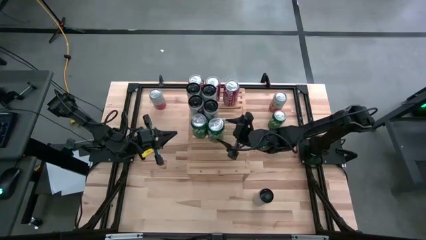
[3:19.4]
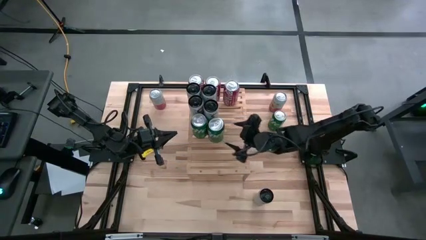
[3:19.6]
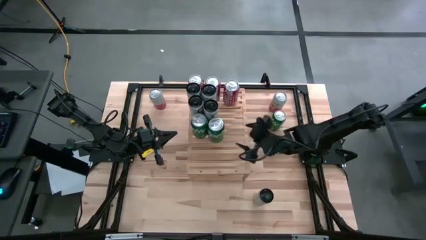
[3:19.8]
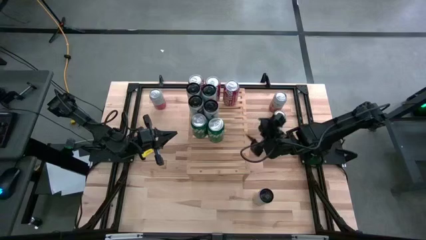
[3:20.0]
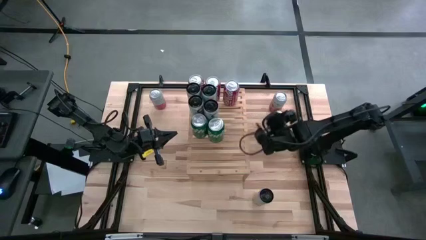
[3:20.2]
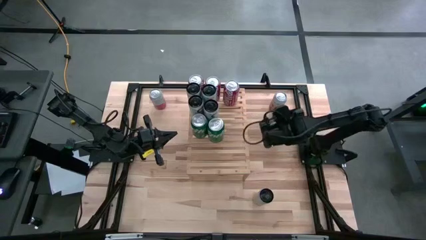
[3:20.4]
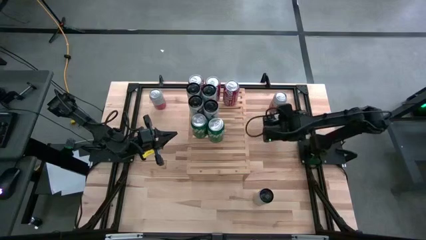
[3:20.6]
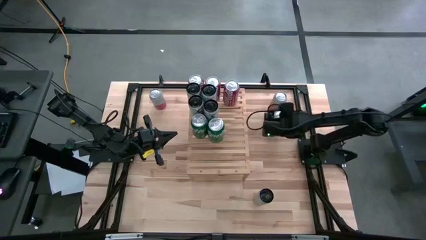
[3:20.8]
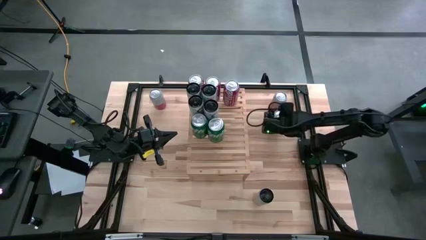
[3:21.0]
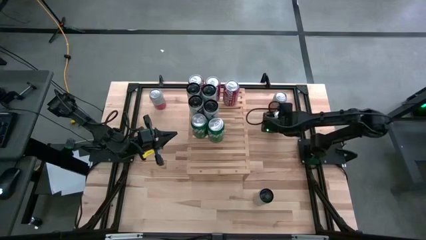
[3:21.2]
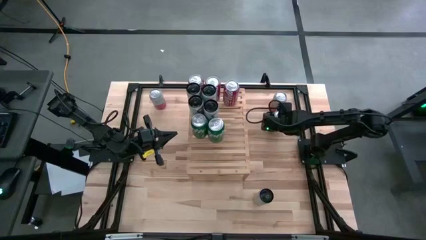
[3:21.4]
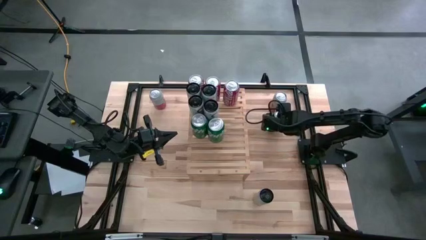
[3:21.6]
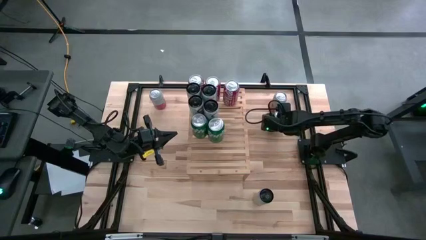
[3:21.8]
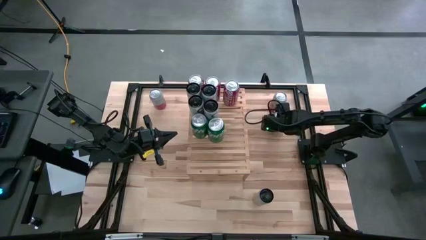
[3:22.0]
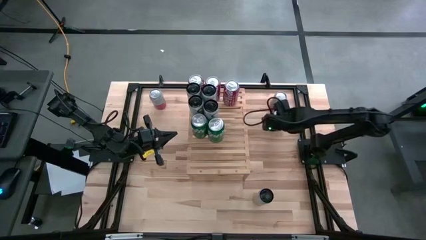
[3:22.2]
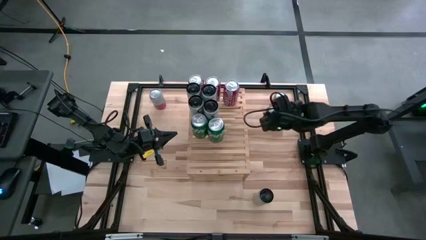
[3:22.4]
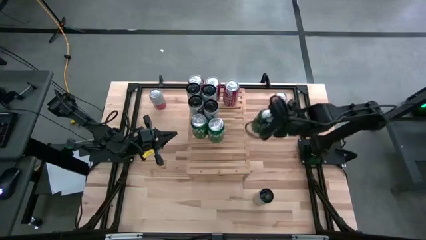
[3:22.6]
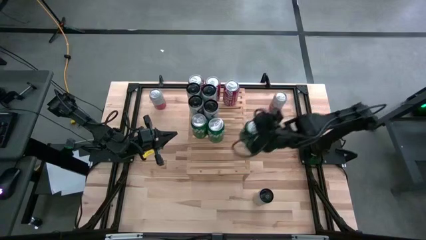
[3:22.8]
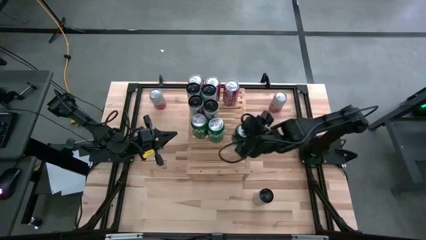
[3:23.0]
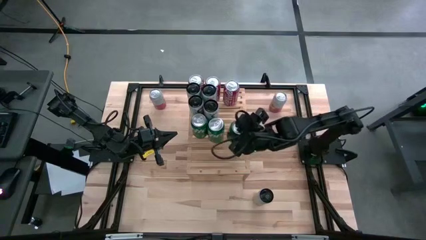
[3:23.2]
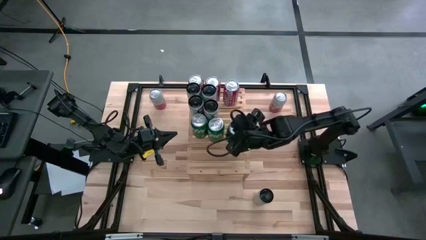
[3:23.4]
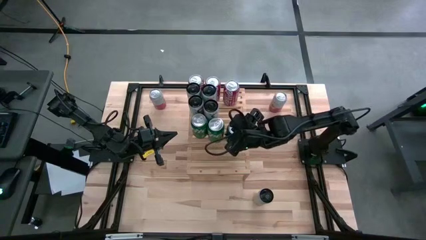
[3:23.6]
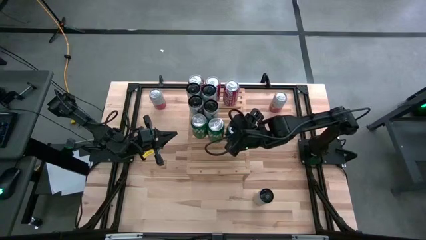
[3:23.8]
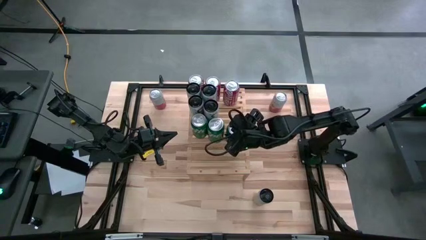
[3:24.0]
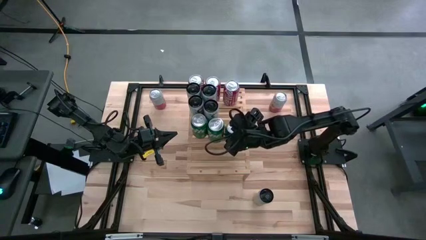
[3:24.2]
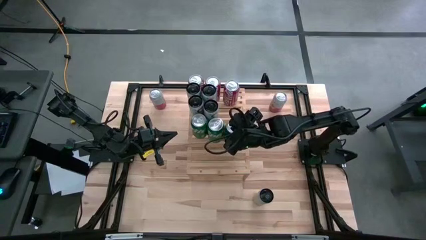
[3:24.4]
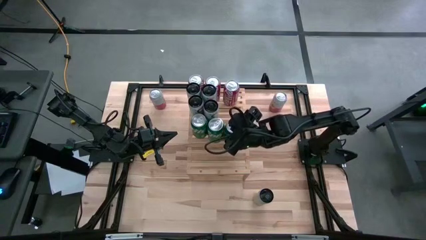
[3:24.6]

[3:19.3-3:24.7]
Task: Place canned beverage on shelf
Align the top green sprite soda can with the other green sprite soda can on the shelf

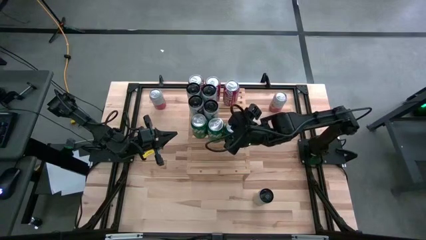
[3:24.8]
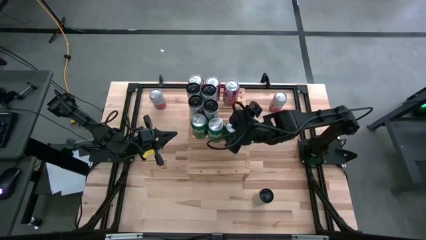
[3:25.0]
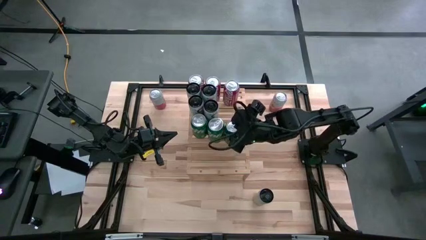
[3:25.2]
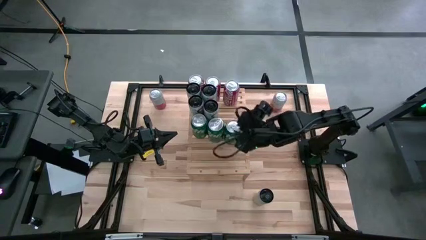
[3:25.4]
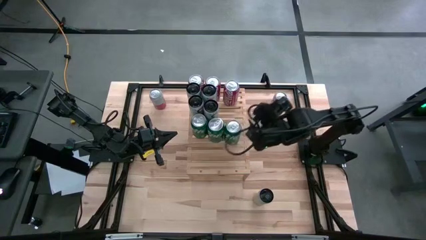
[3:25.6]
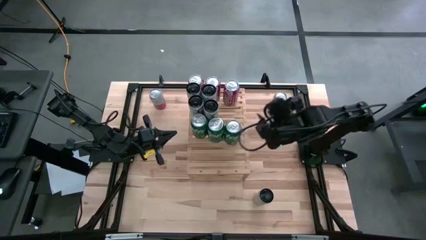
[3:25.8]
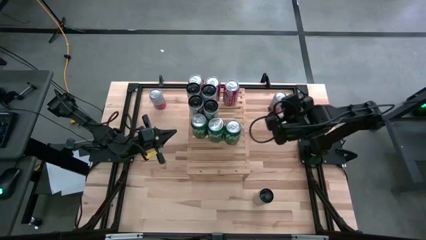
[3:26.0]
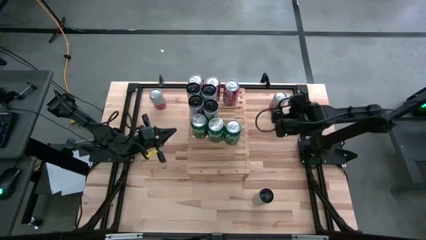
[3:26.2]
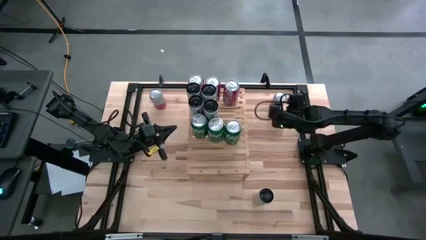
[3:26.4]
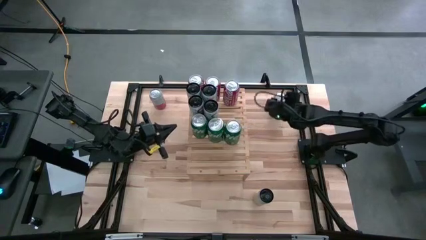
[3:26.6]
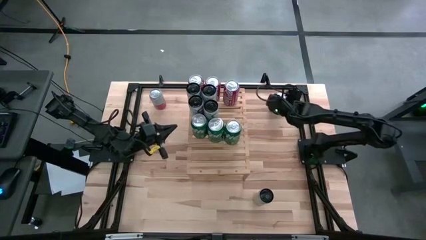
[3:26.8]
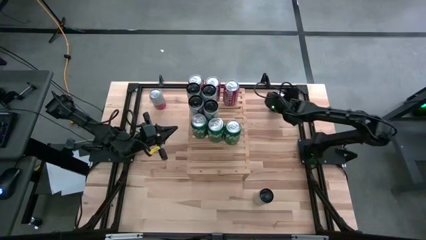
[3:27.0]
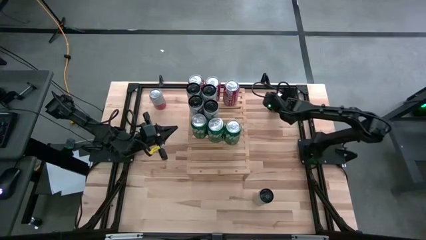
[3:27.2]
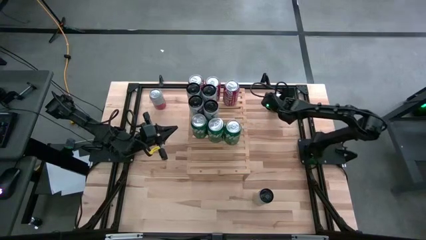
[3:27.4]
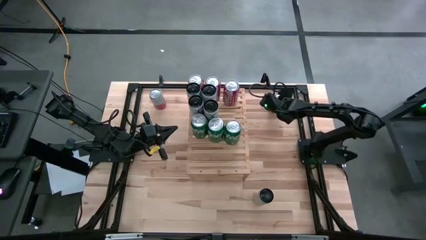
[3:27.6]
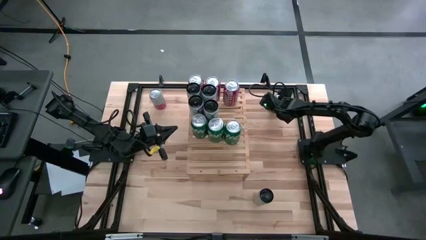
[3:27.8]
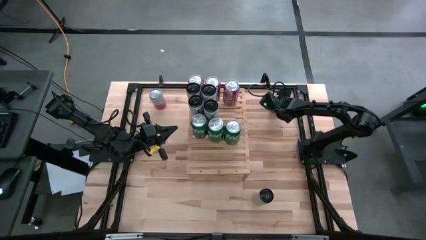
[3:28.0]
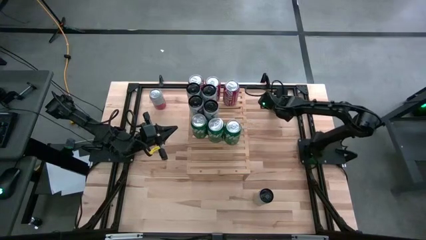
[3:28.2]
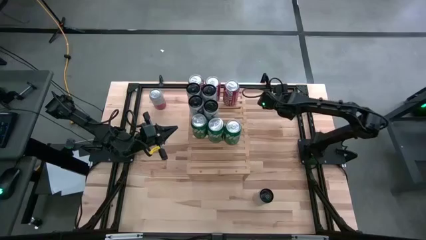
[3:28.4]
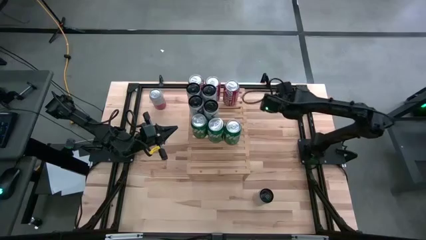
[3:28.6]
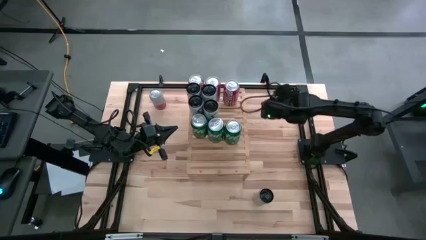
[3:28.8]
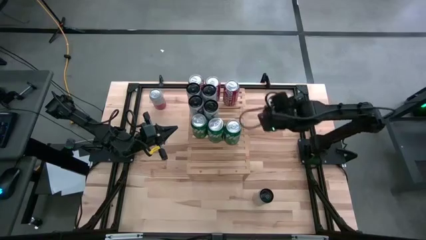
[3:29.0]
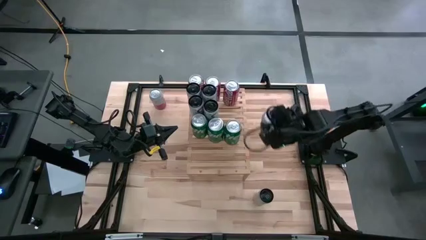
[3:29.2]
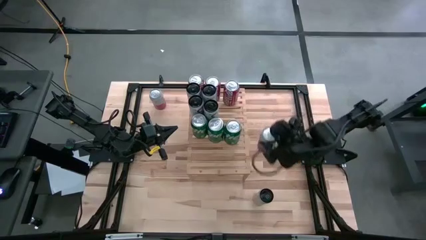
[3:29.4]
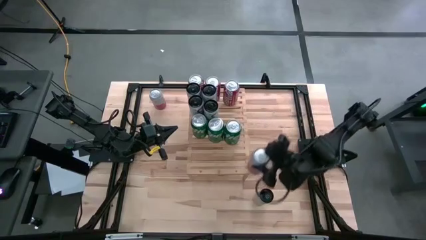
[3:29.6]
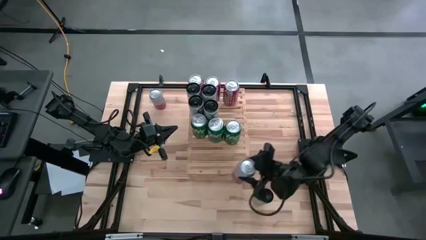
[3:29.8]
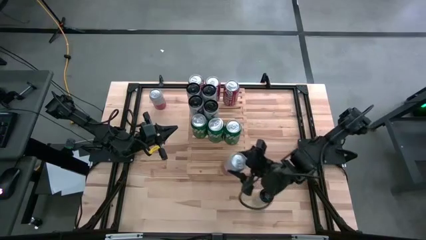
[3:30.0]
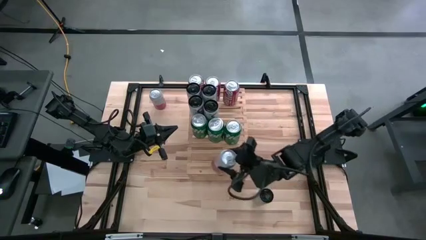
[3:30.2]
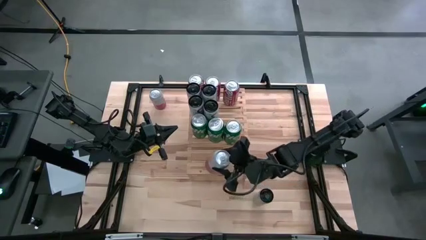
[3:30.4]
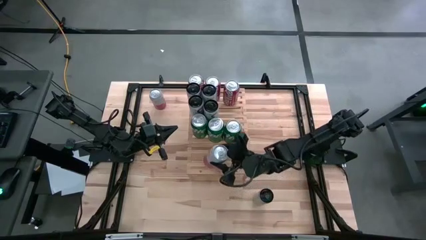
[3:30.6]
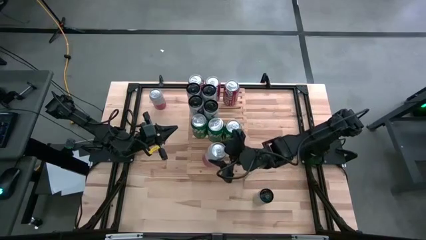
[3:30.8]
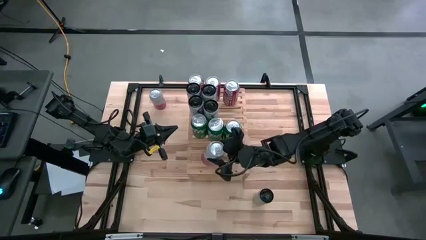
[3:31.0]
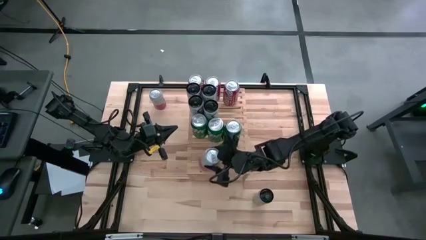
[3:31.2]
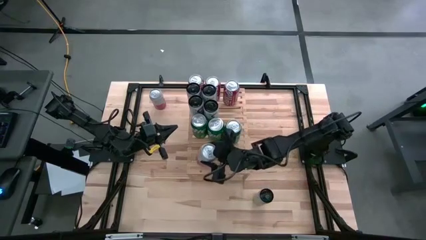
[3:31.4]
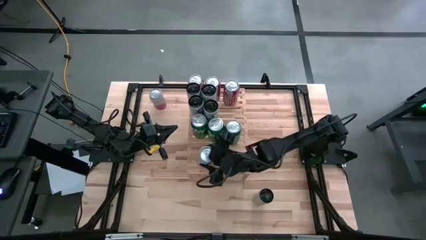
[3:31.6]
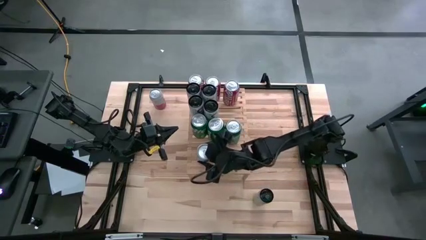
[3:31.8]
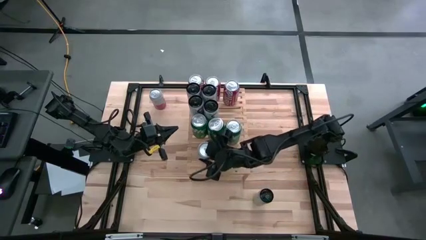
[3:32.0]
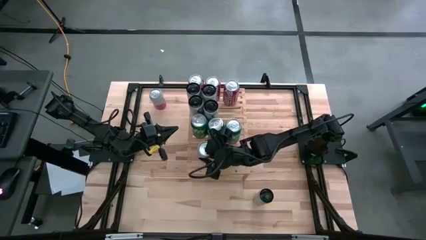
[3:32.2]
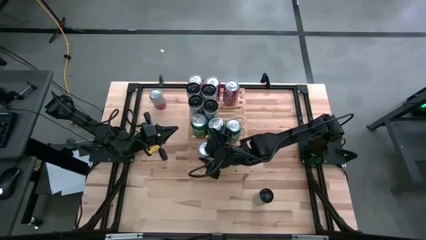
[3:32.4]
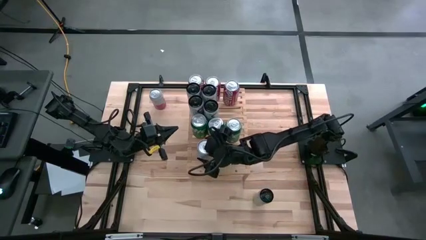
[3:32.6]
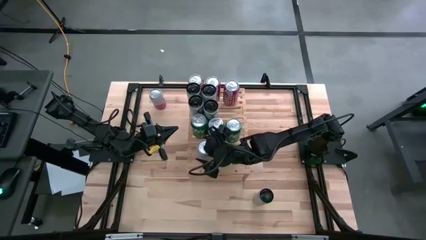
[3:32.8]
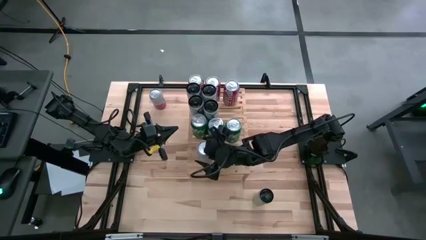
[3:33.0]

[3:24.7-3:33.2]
Put the top right pink soda can on the shelf
